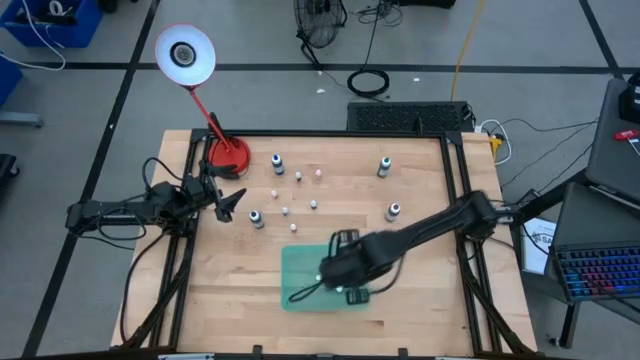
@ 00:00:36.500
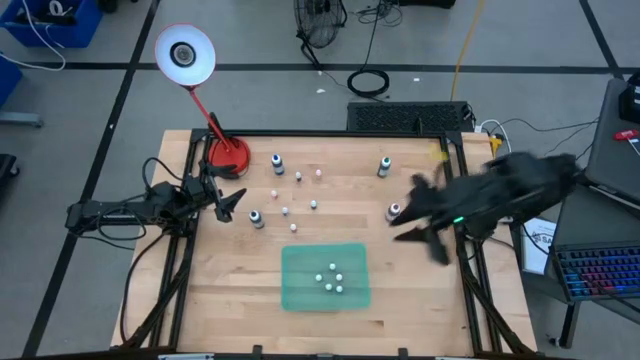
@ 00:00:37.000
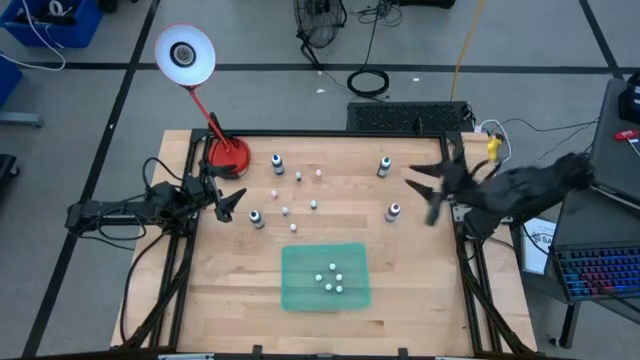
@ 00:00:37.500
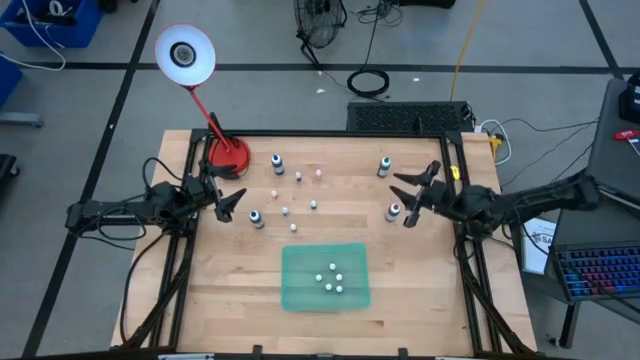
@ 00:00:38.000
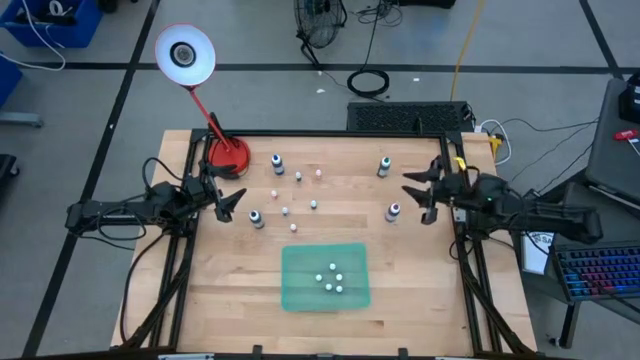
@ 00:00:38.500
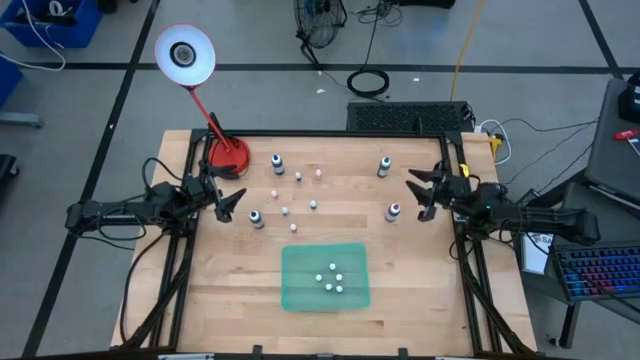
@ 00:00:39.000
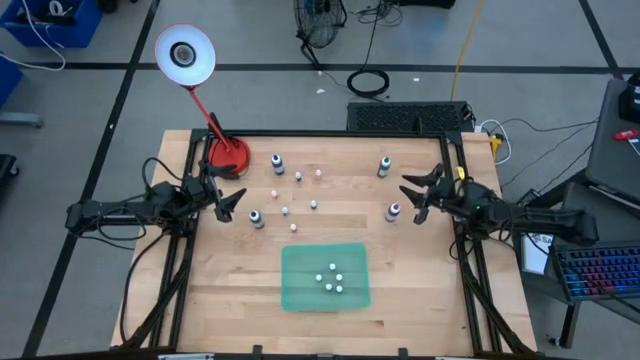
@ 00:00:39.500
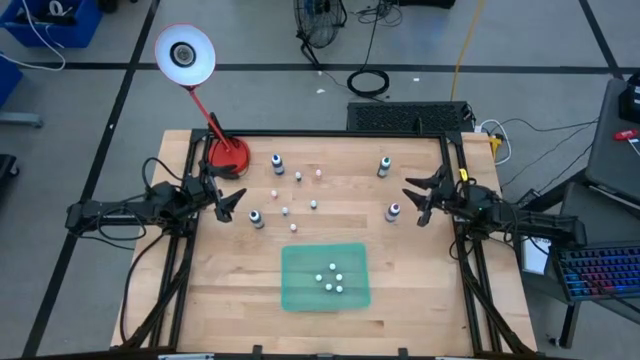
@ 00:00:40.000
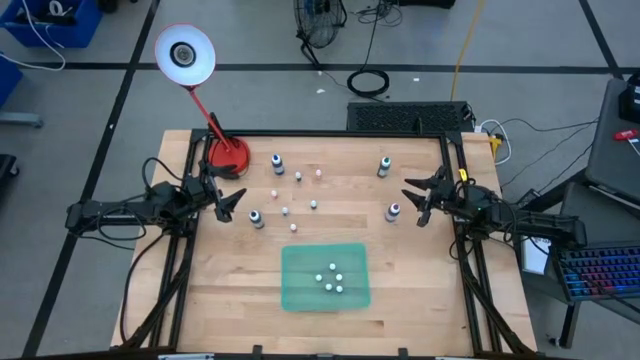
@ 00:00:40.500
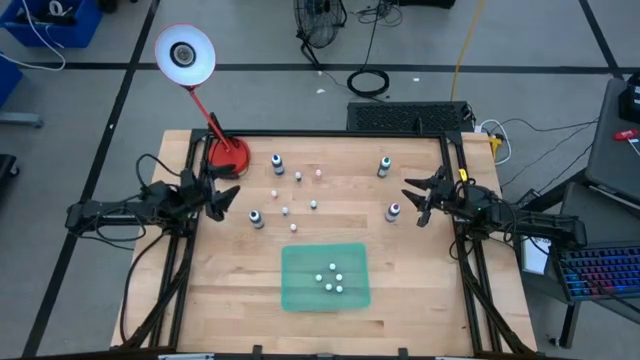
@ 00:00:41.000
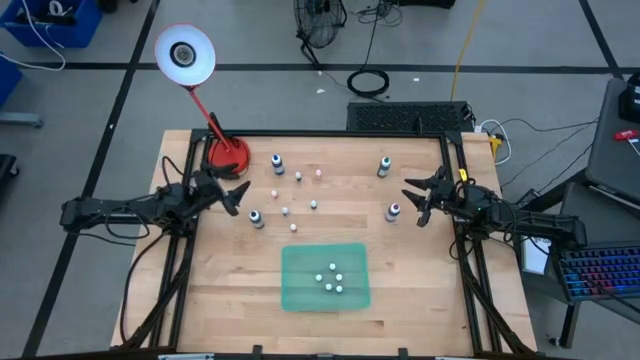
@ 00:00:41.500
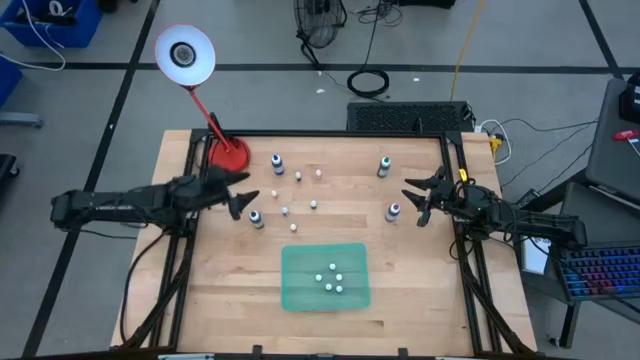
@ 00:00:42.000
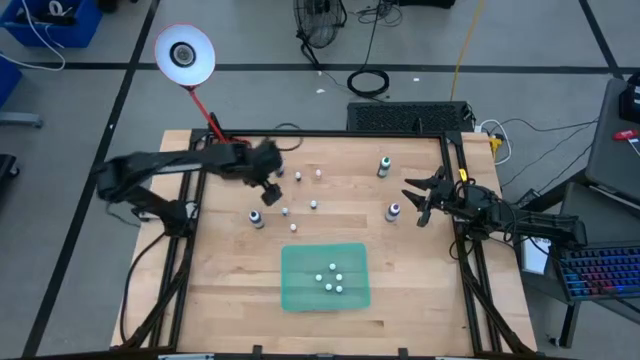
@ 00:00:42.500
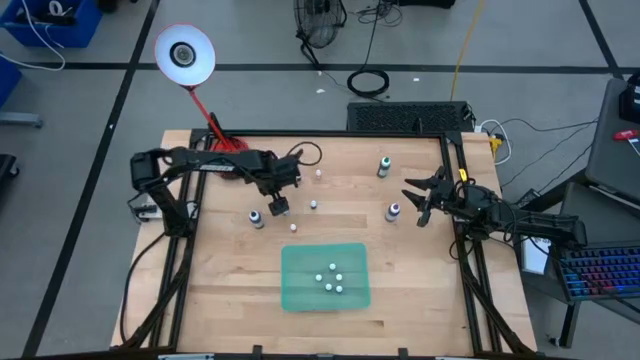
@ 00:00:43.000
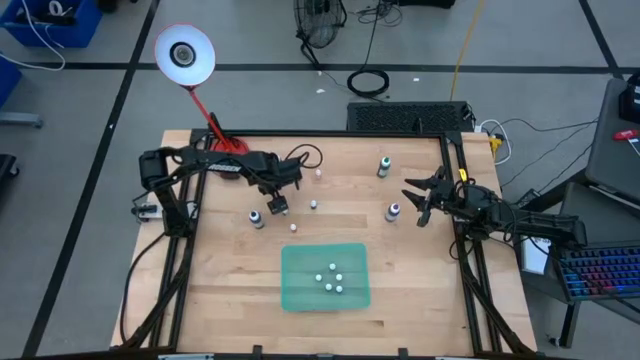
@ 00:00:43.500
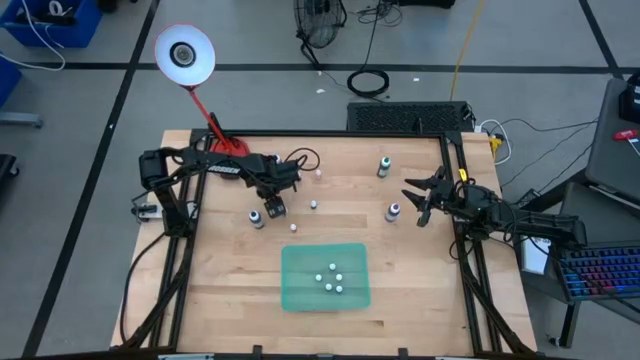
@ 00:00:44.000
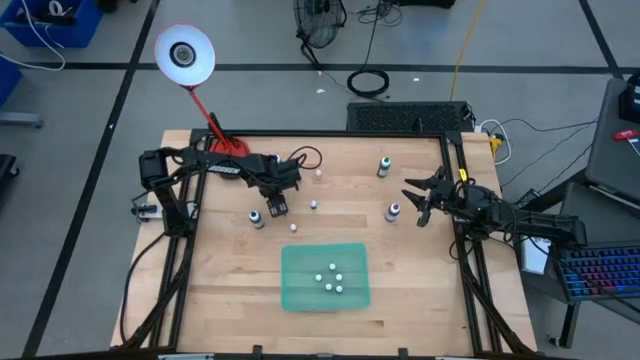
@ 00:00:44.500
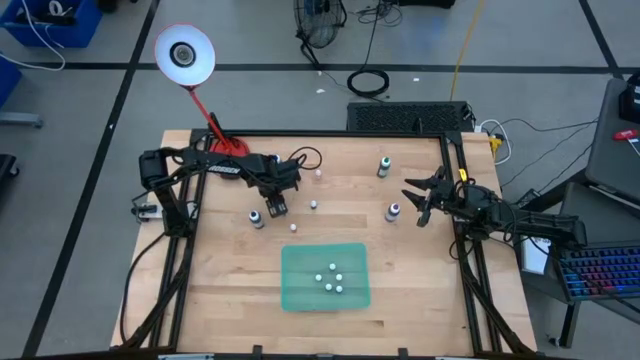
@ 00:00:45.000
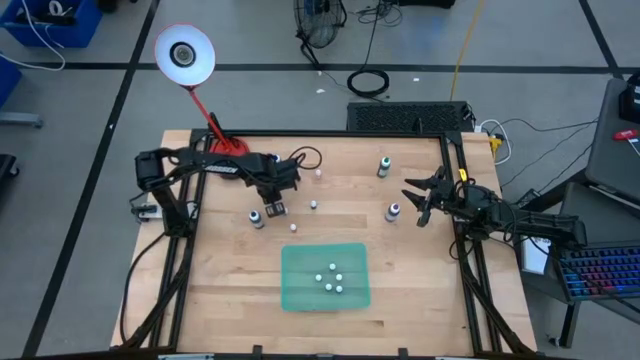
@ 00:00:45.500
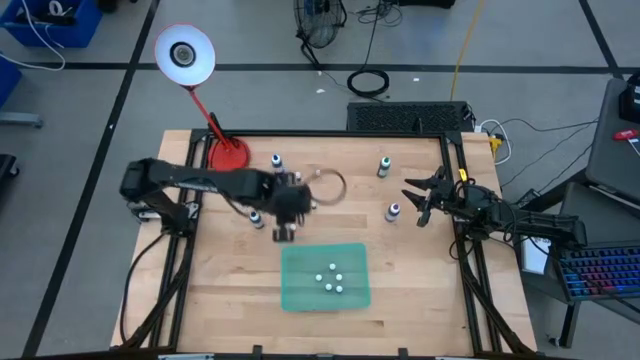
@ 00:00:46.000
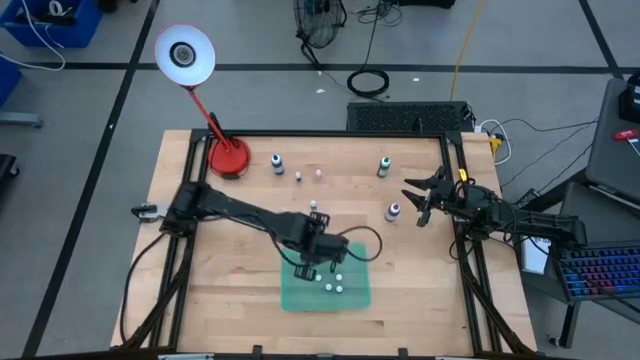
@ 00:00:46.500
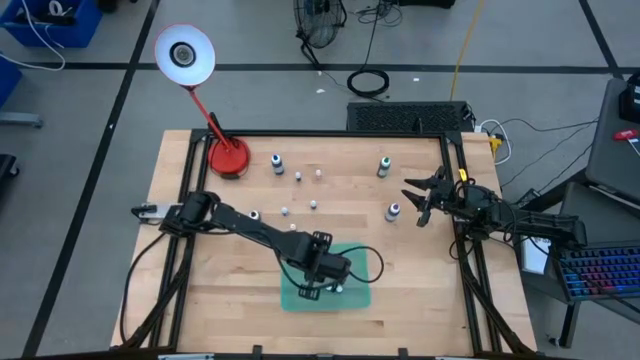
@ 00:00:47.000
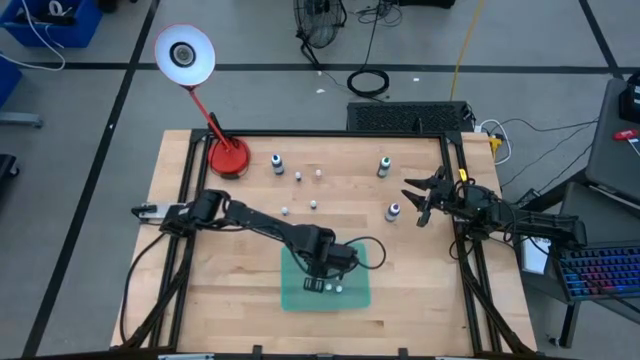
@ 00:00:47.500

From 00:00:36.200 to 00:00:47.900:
Task: Pick & Place food coloring
Put the middle left small yellow food coloring bottle into the blue bin

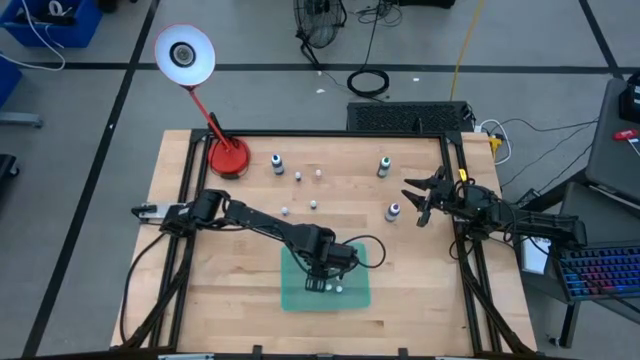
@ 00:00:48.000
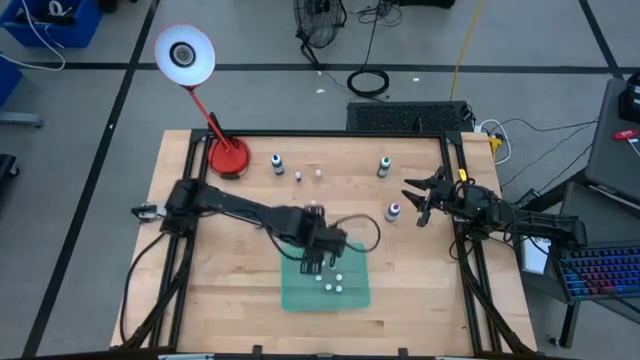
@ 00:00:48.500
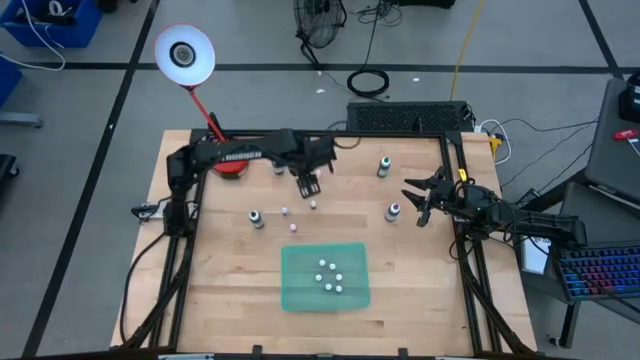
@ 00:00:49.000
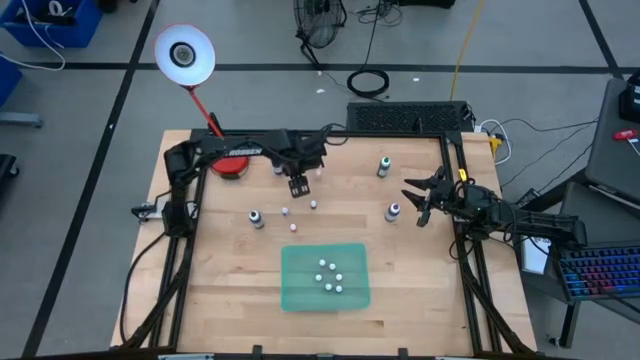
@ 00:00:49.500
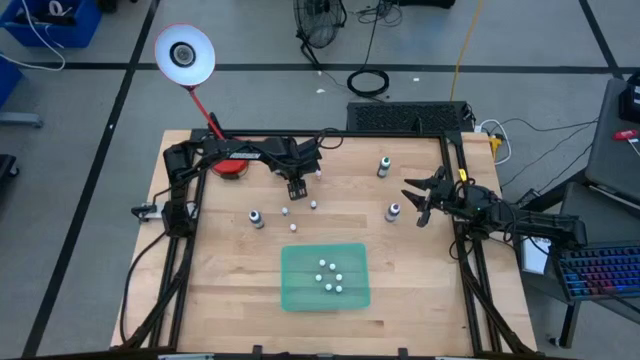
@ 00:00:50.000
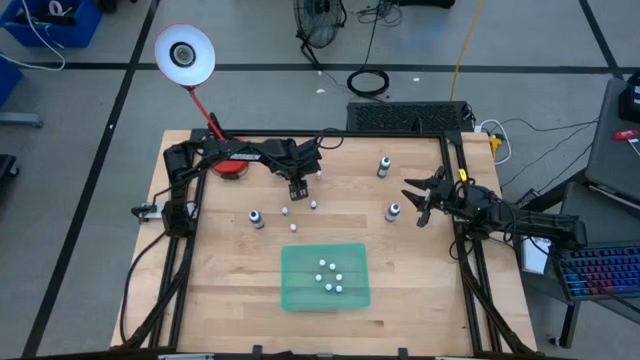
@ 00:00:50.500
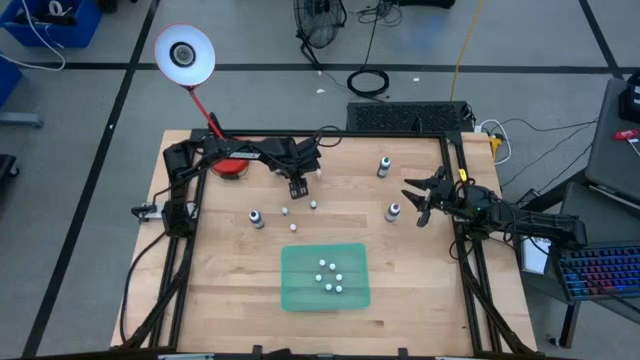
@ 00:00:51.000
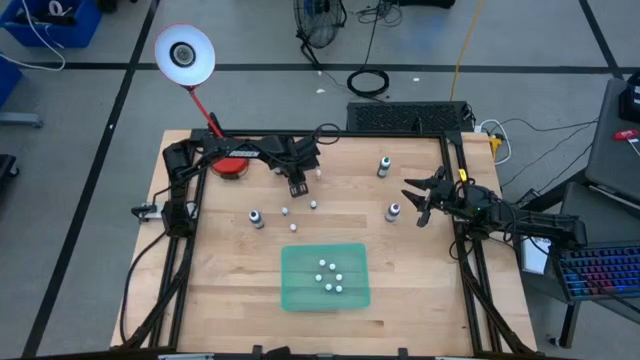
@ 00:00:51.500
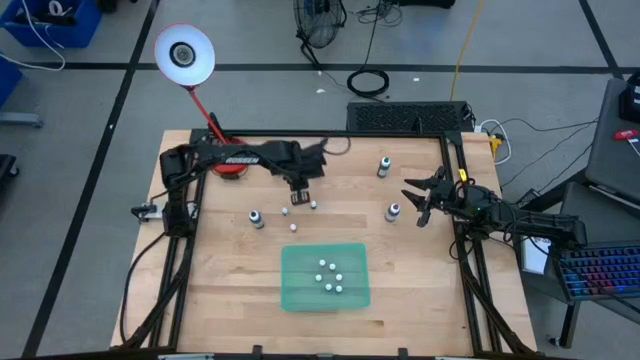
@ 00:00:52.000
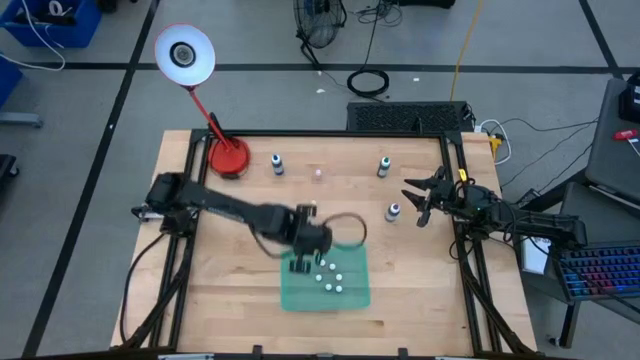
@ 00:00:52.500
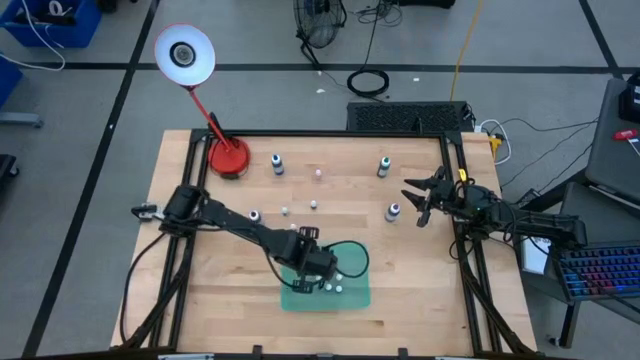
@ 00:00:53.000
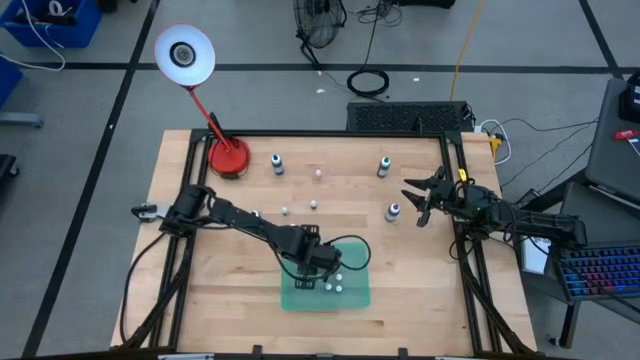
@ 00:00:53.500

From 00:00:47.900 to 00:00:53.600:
Put the top small black food coloring bottle into the blue bin

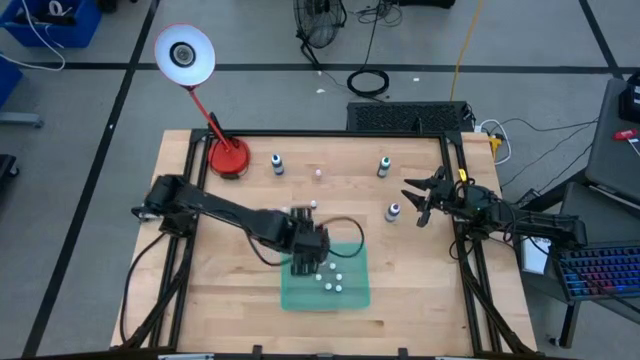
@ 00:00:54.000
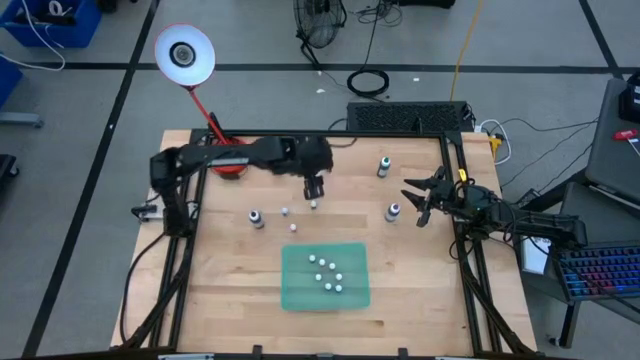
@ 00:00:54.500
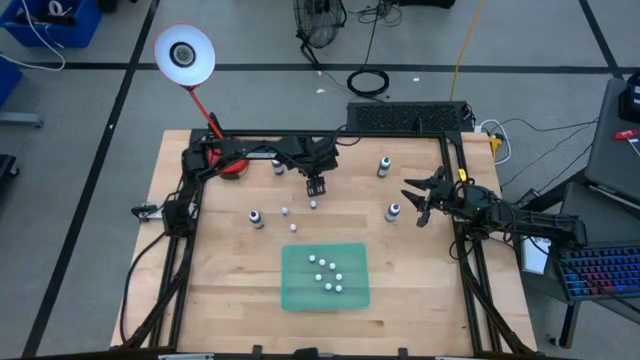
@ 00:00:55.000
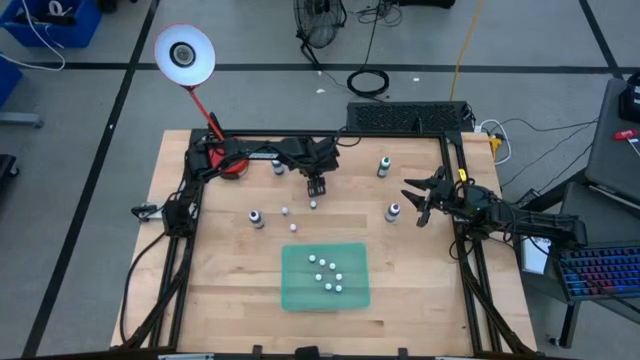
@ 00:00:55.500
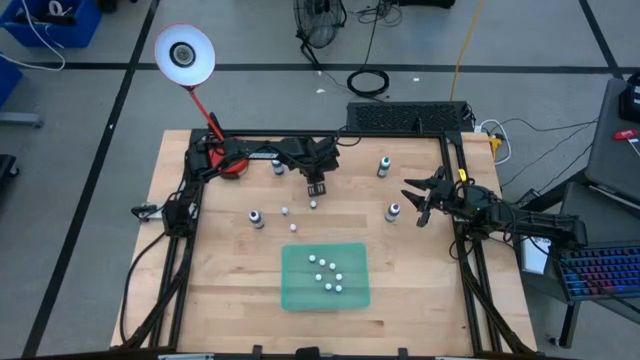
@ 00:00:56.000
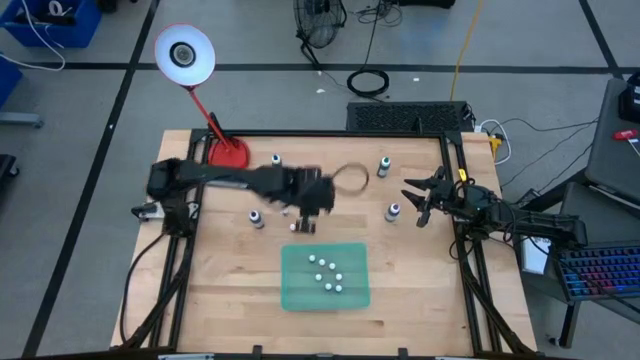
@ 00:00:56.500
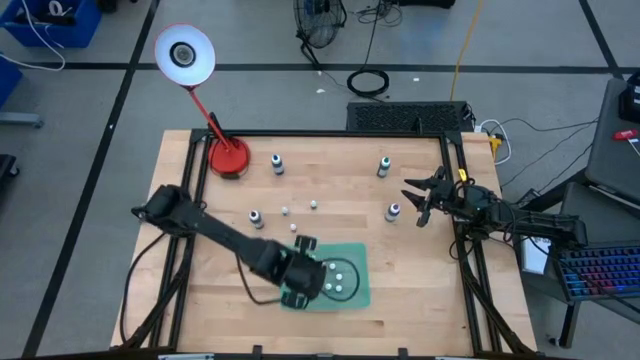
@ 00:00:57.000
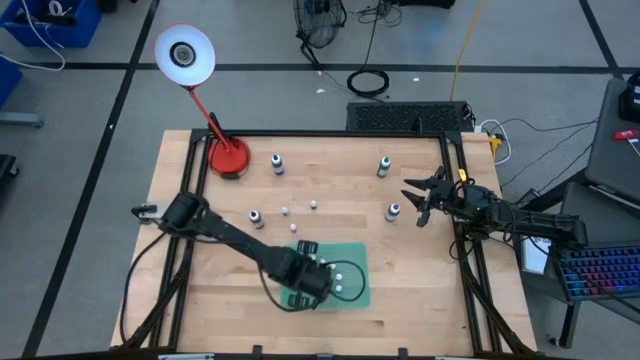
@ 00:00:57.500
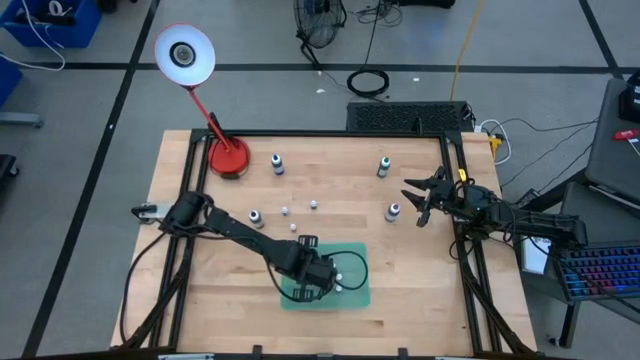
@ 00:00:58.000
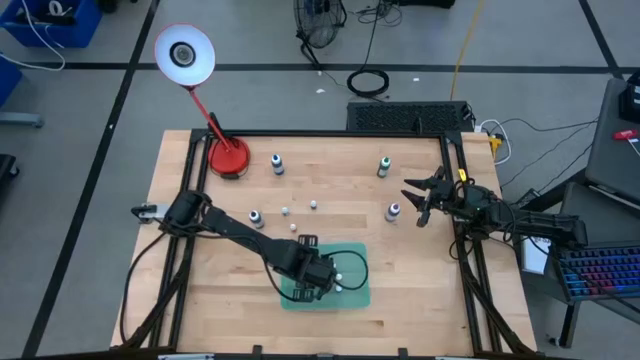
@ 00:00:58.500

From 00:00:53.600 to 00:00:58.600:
Put the top small yellow food coloring bottle into the blue bin
